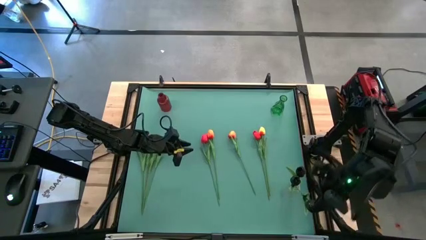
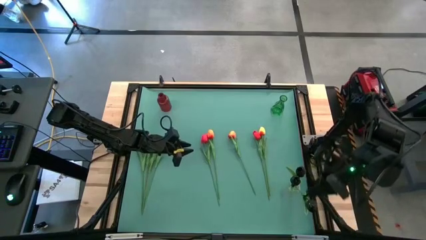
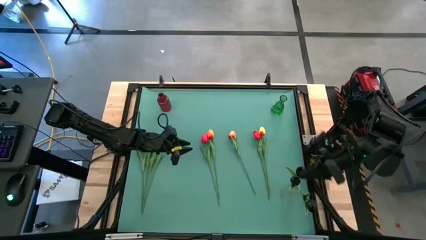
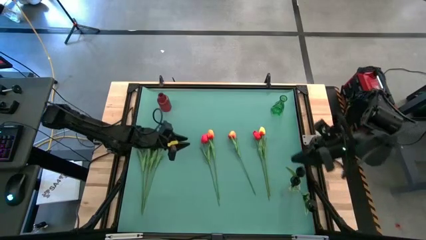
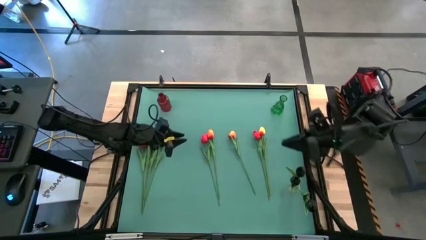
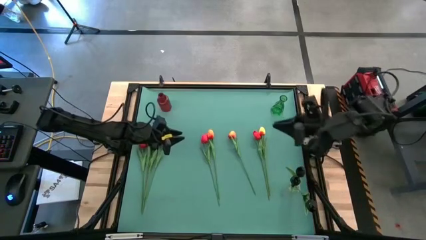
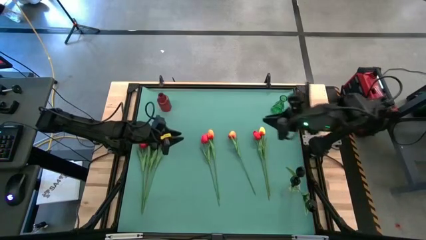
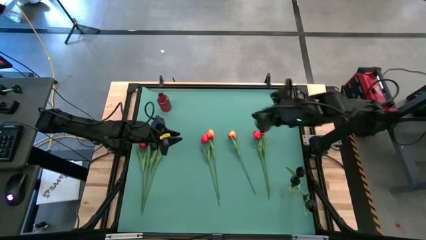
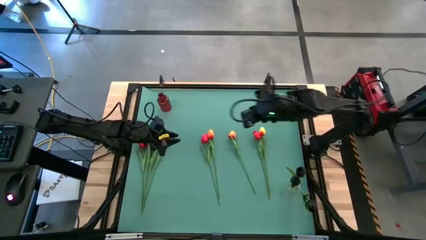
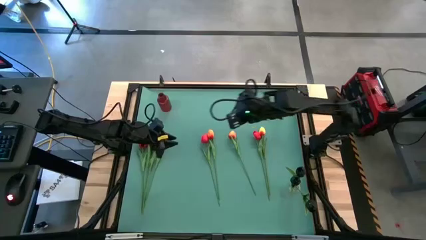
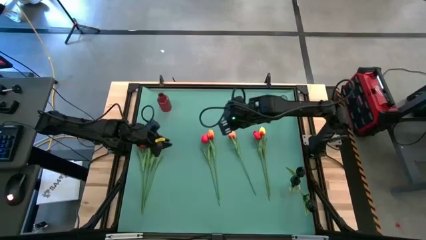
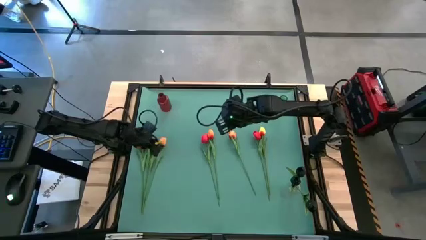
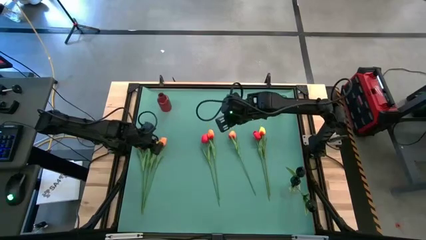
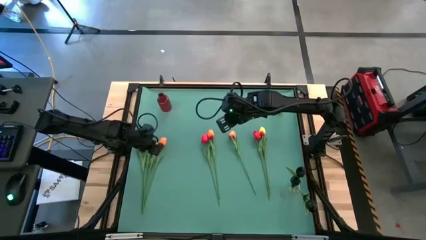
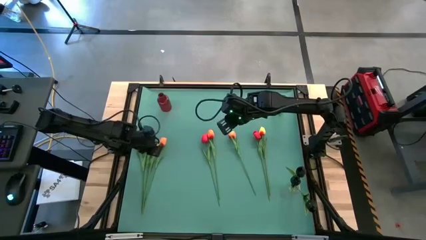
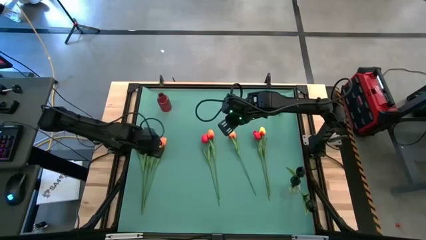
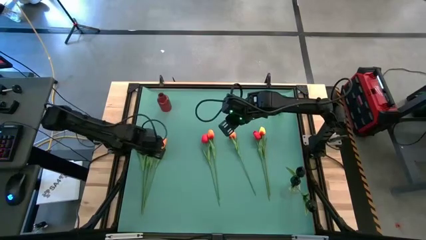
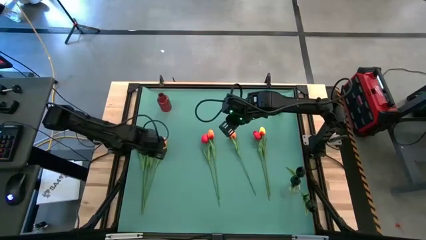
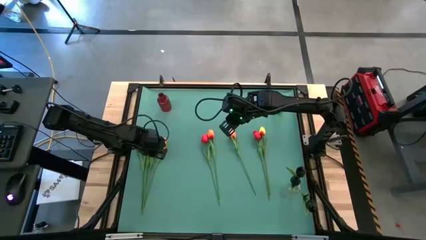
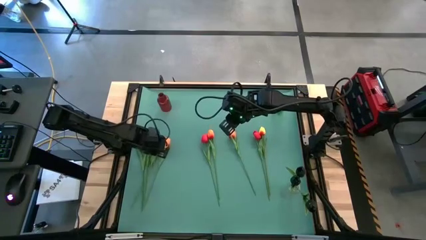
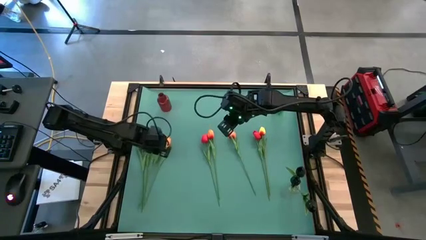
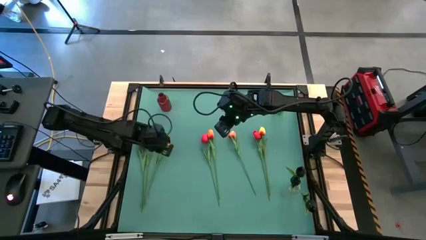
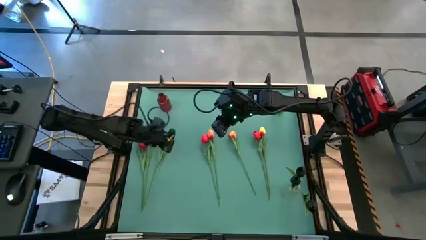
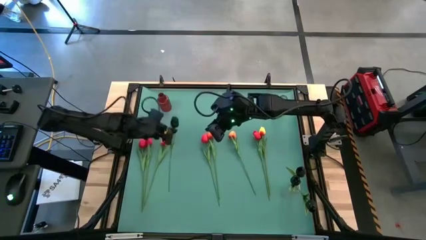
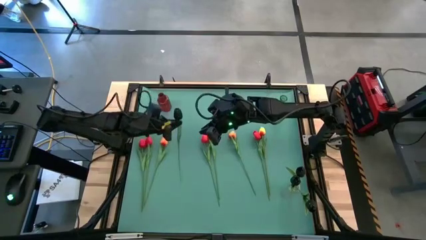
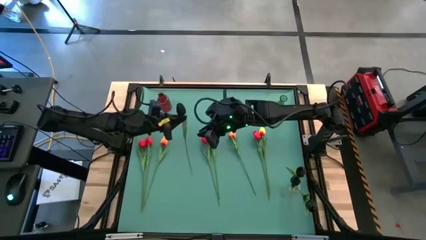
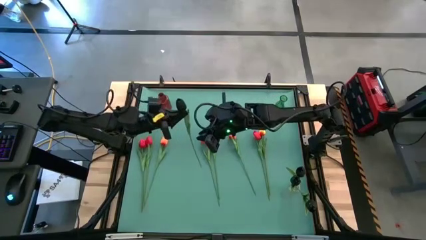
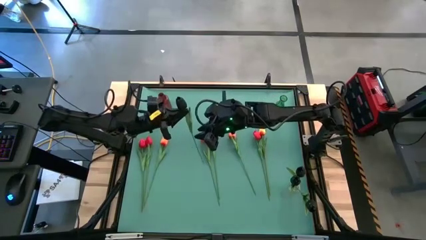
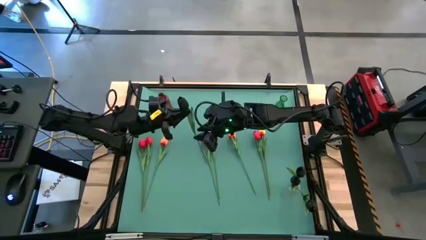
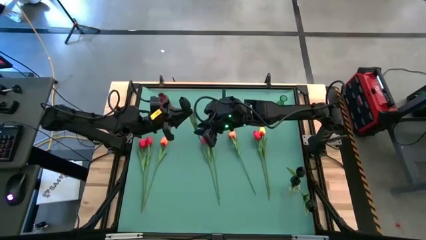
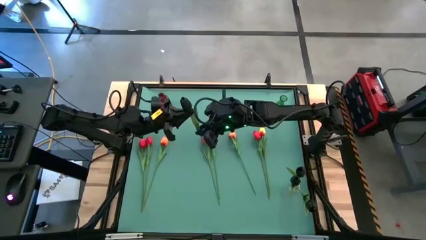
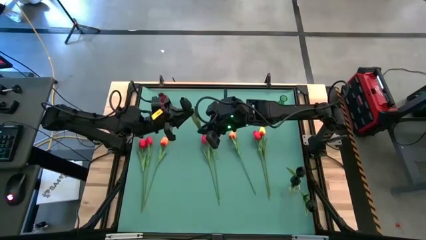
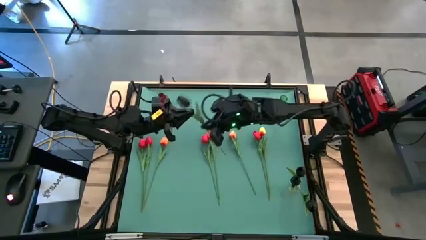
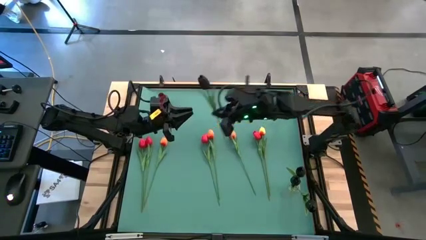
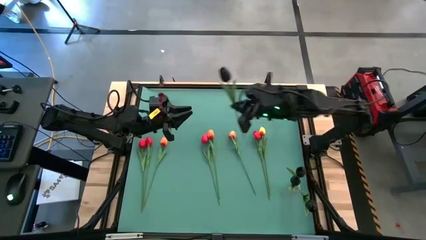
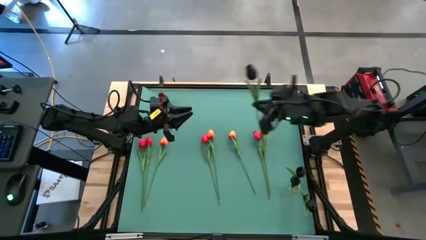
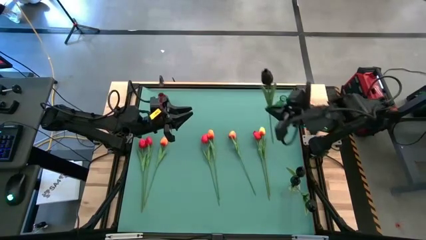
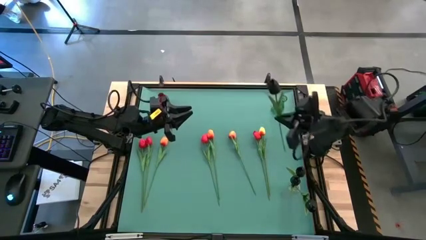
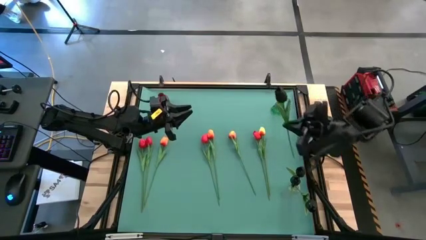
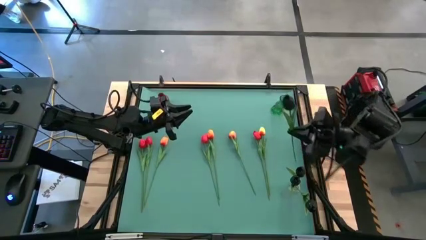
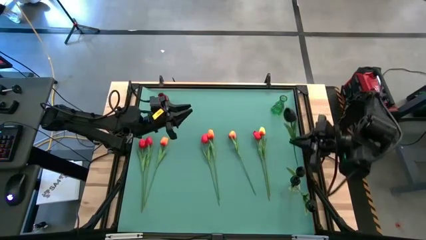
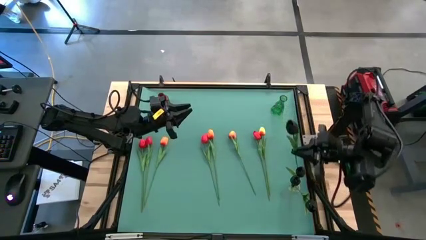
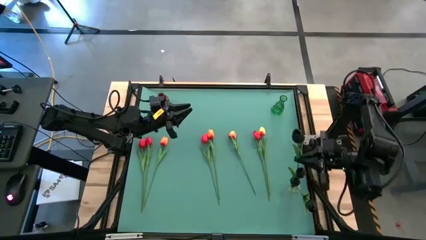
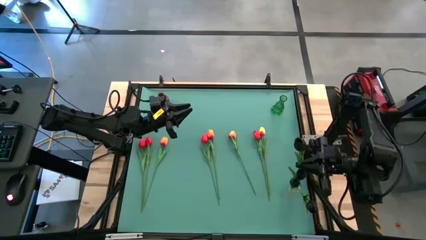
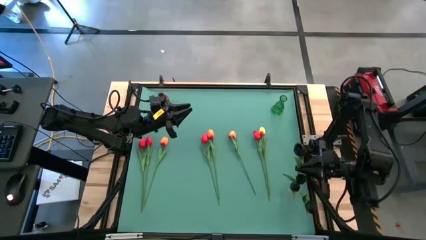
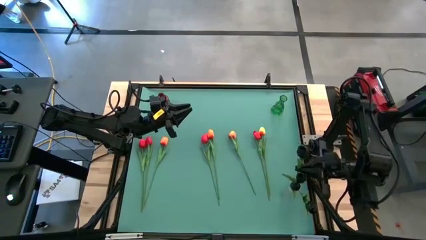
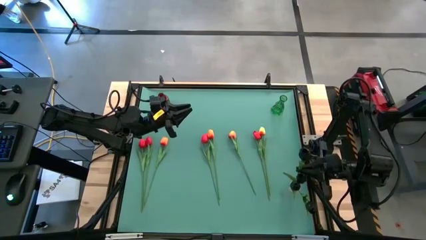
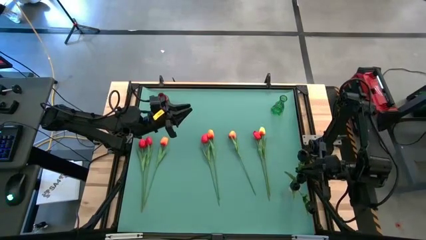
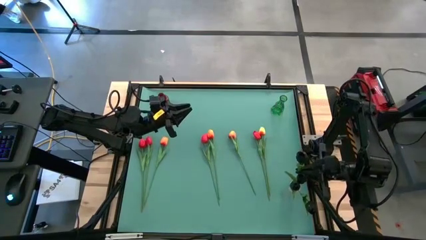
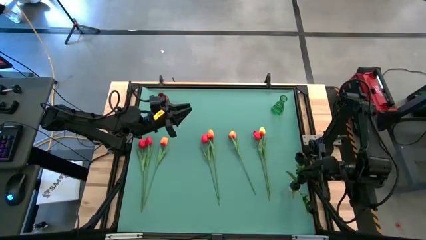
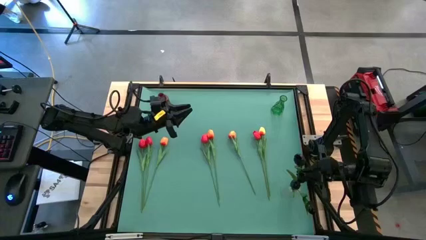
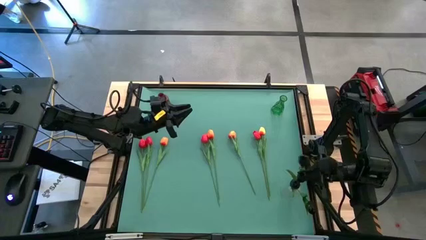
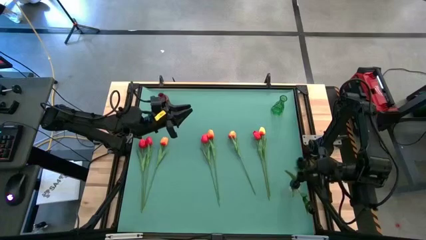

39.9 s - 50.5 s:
Task: Sort flowers into vase by color
Put the black tulip into the transparent flower vase

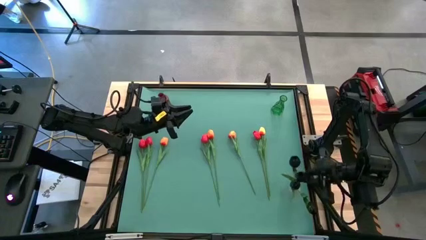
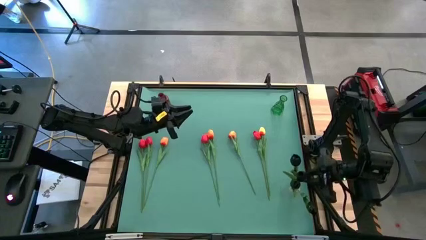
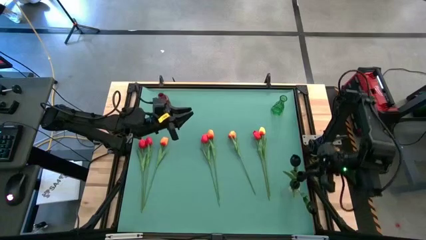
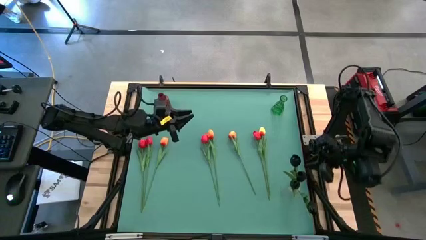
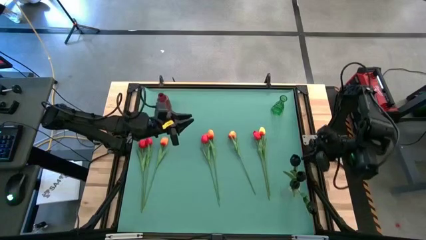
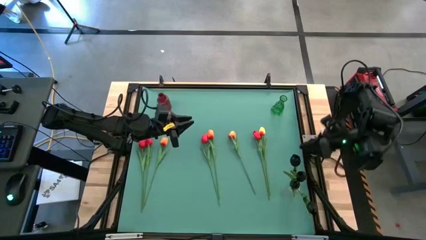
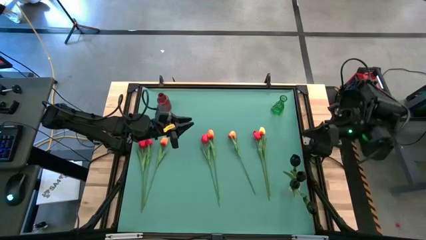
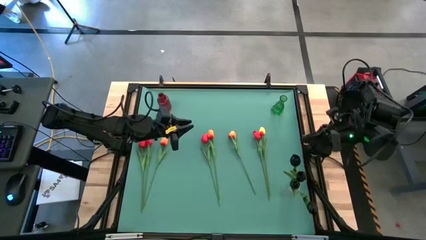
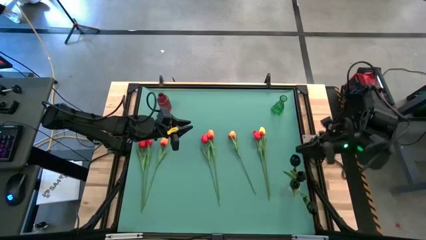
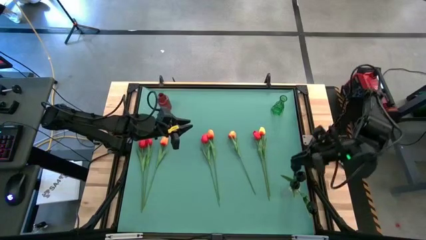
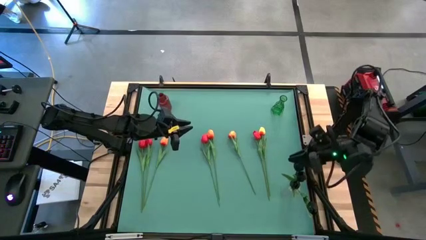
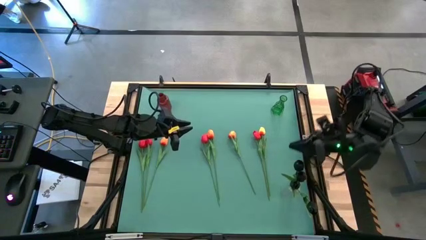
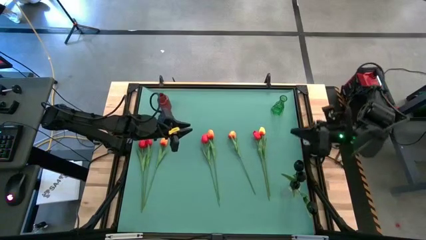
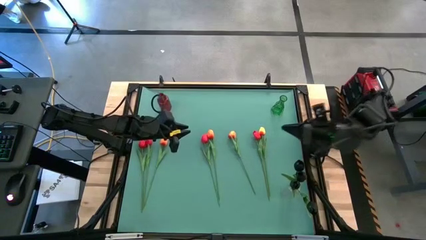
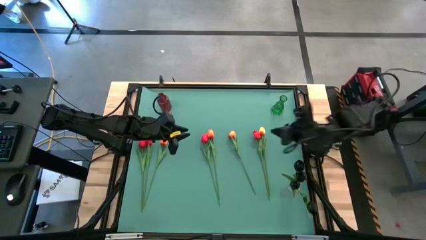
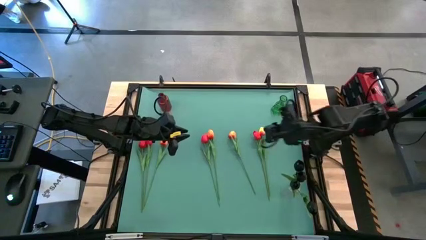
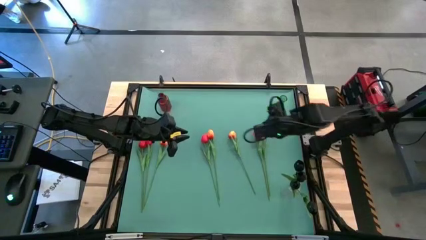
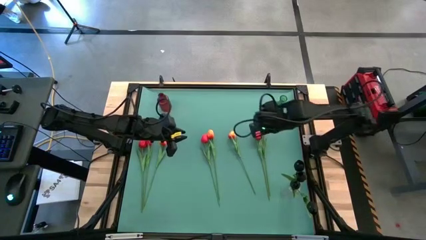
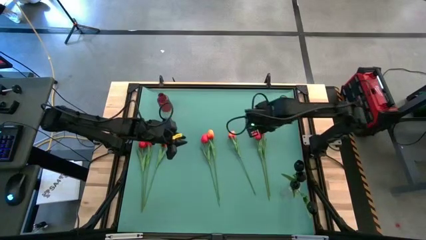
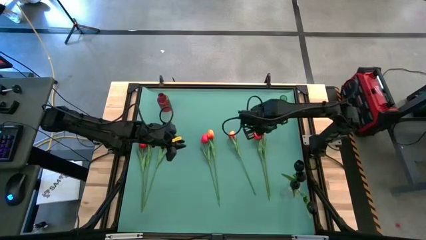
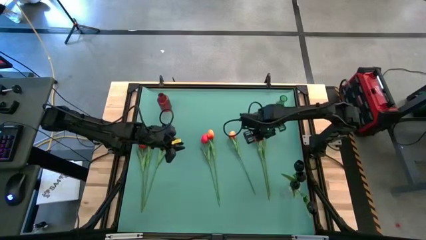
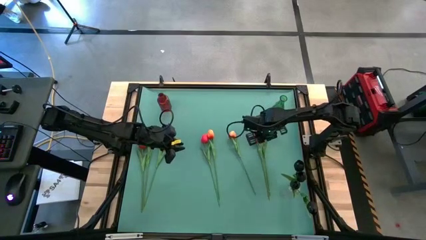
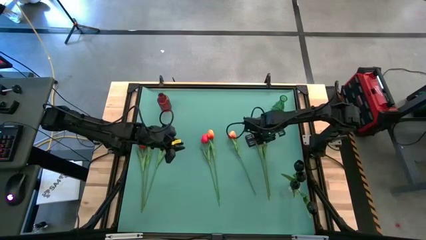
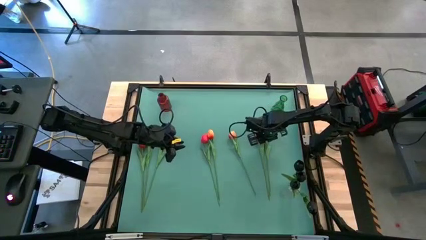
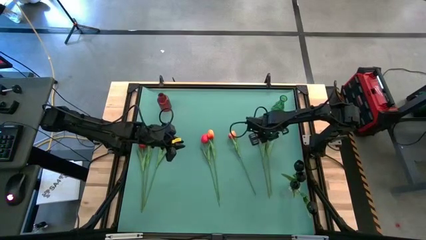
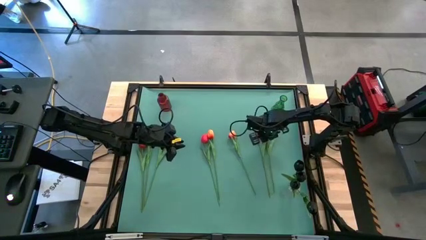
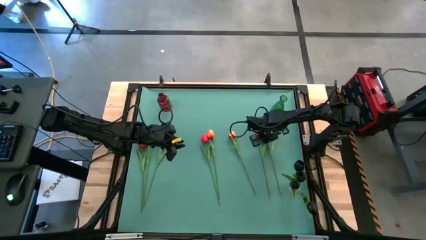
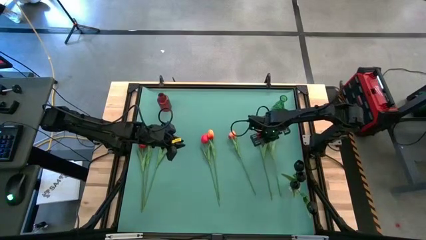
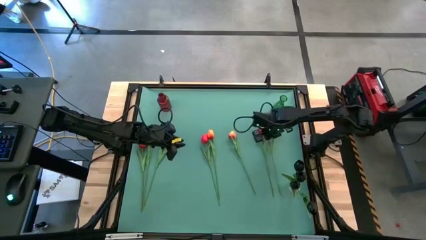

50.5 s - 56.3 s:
Put the right orange tulip into the green flower vase
